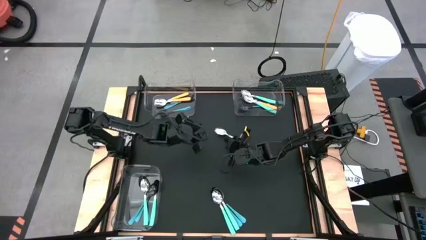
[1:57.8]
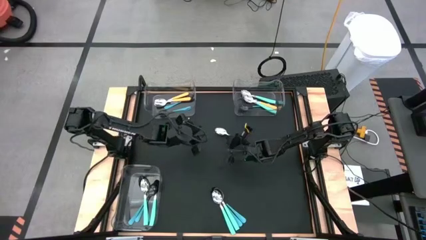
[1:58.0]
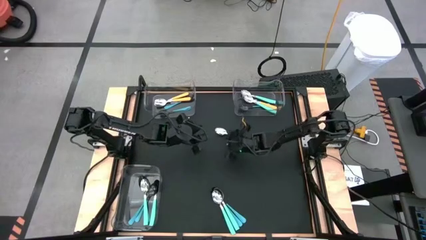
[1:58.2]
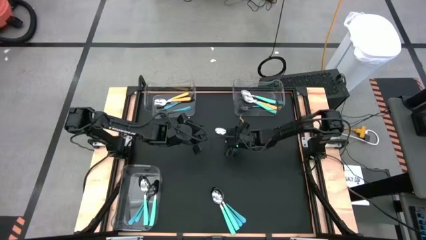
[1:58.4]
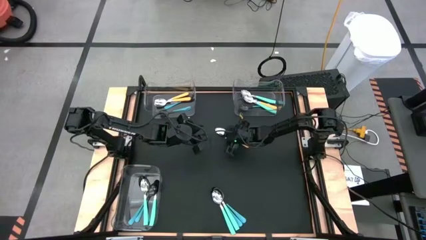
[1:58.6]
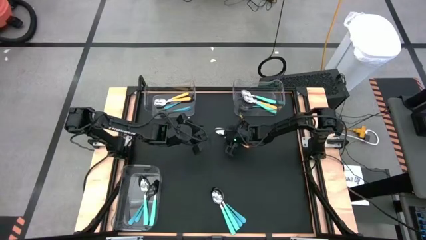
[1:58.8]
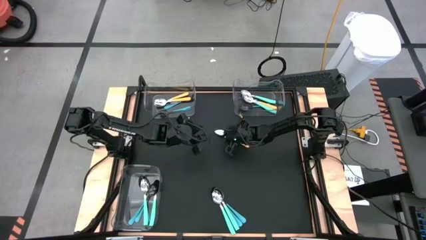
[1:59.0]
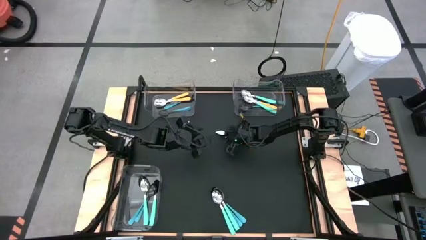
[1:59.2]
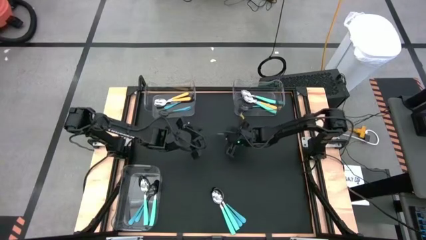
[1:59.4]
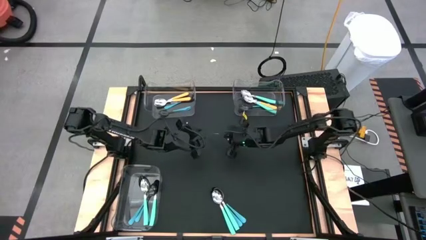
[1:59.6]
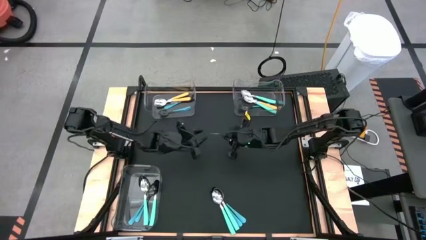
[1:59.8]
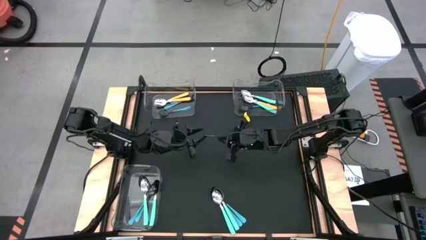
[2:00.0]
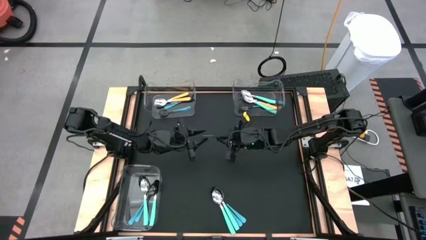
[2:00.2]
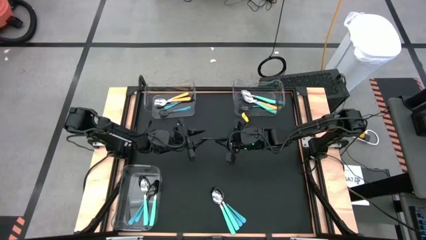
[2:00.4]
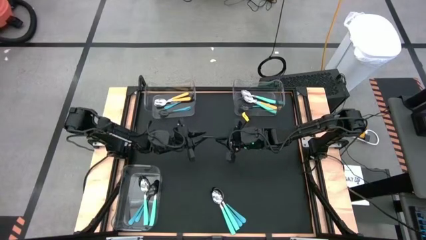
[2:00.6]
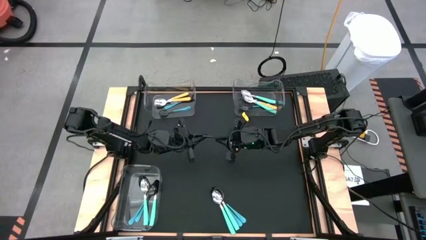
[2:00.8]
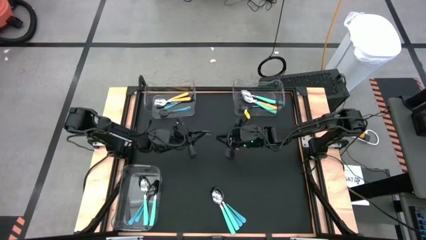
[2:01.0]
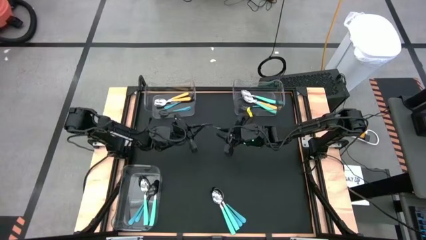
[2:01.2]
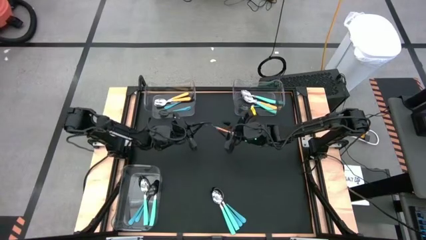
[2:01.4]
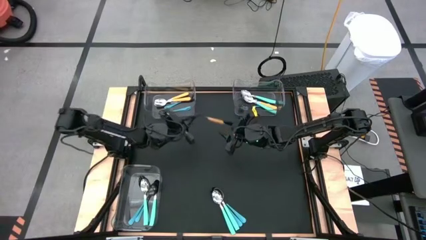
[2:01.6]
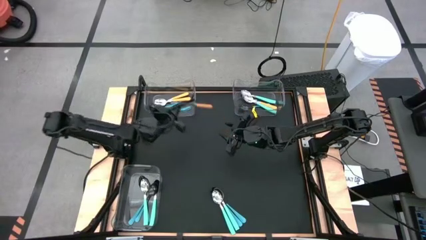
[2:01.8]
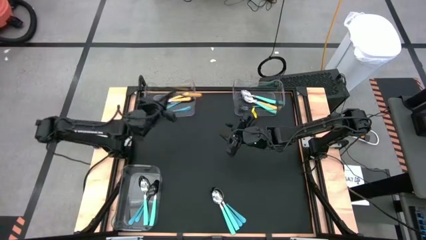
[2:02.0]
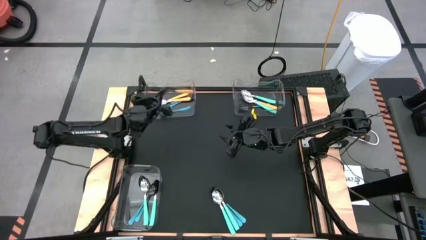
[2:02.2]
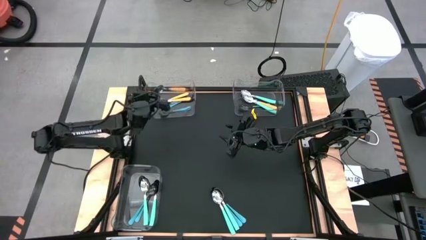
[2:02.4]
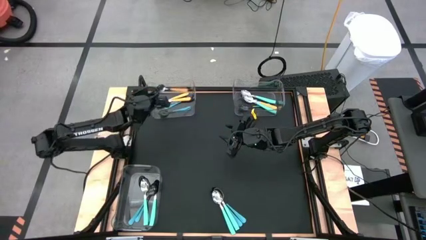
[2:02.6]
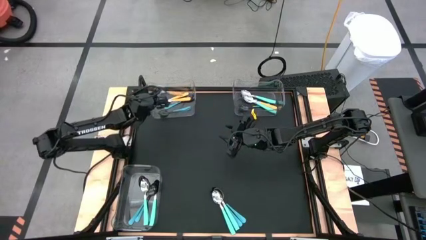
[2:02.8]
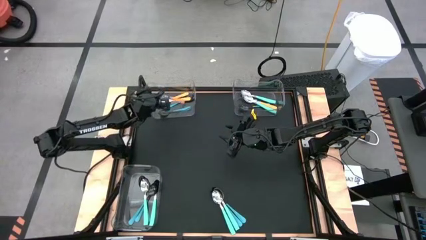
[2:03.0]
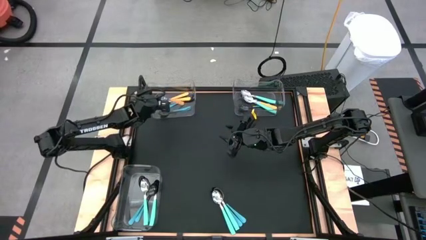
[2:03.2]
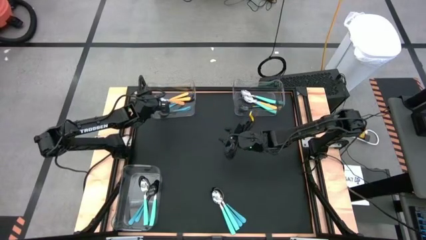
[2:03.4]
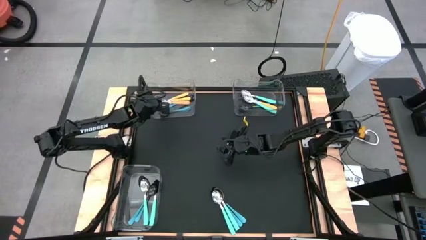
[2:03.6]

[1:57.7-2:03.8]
Task: Sort silverware by color (type)
Put the yellow spoon into the top left transparent bin

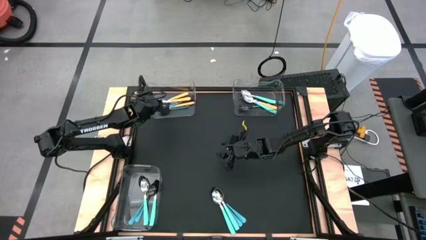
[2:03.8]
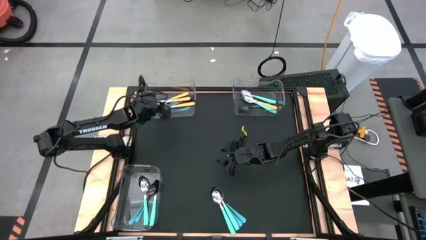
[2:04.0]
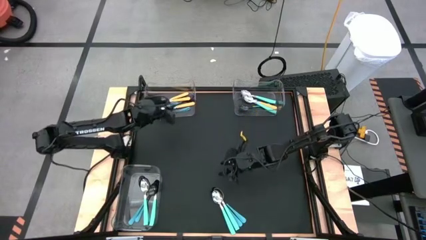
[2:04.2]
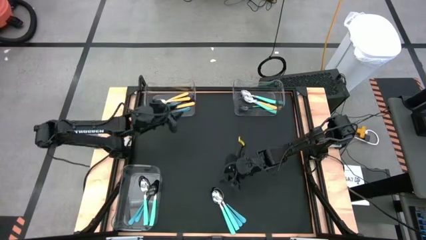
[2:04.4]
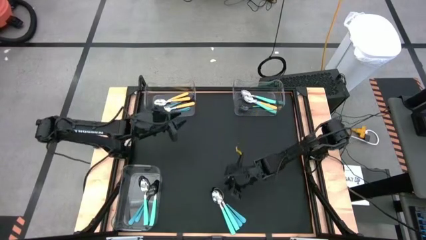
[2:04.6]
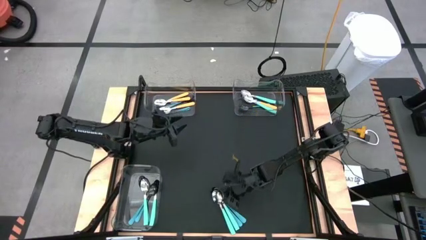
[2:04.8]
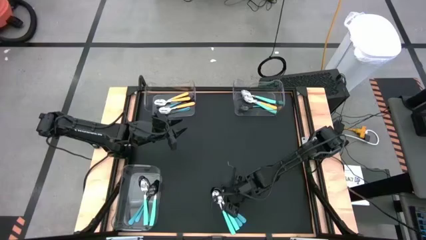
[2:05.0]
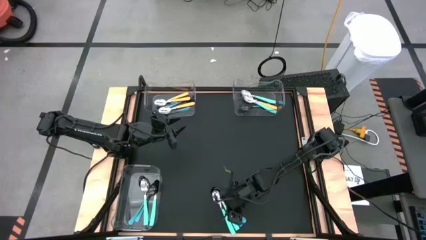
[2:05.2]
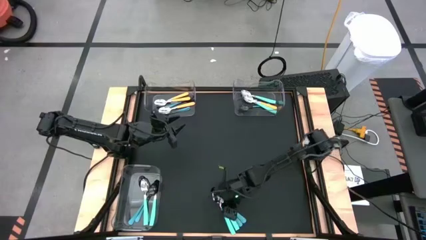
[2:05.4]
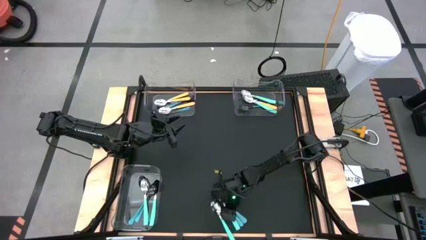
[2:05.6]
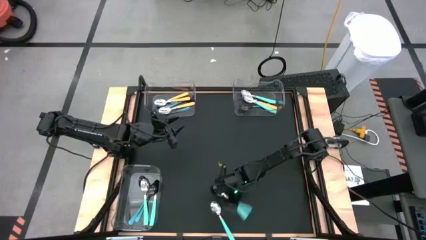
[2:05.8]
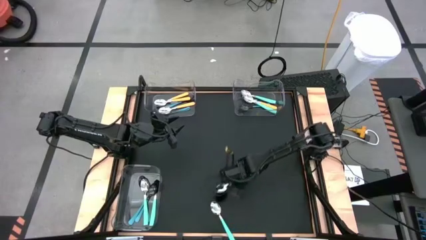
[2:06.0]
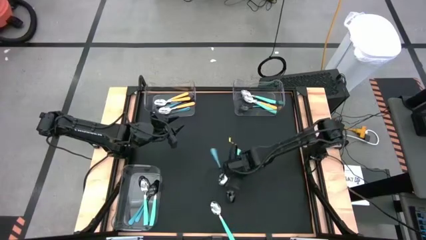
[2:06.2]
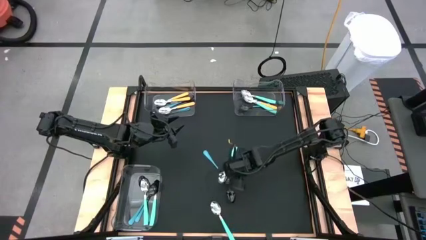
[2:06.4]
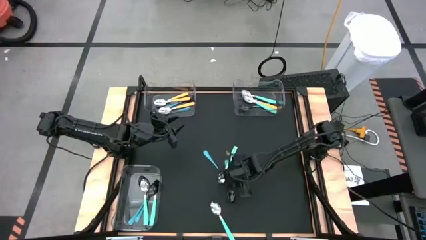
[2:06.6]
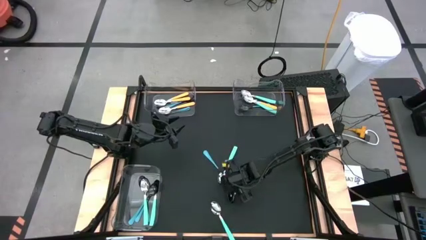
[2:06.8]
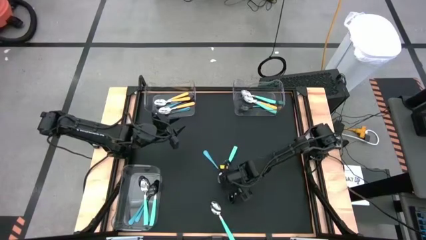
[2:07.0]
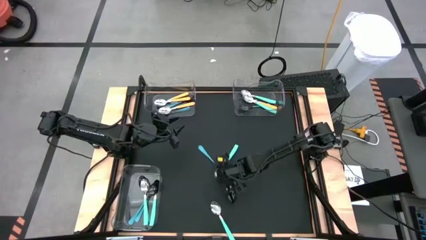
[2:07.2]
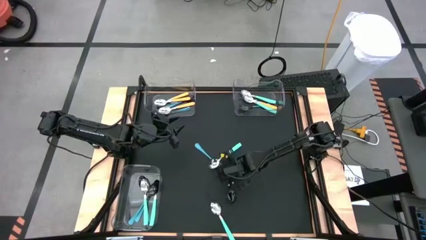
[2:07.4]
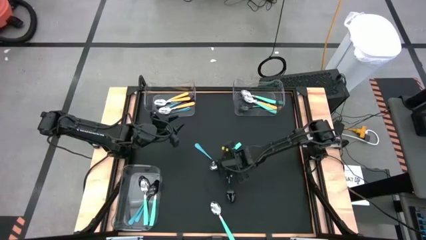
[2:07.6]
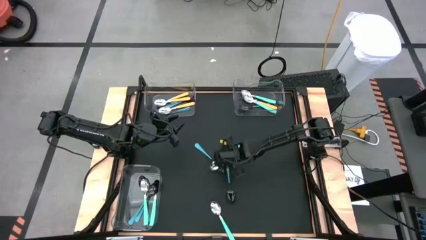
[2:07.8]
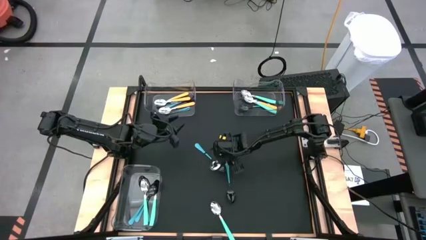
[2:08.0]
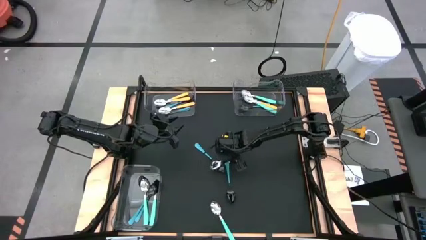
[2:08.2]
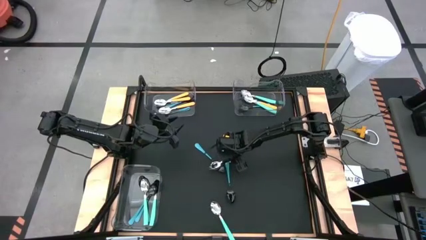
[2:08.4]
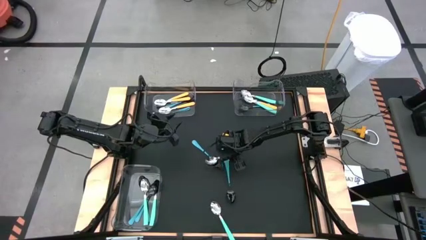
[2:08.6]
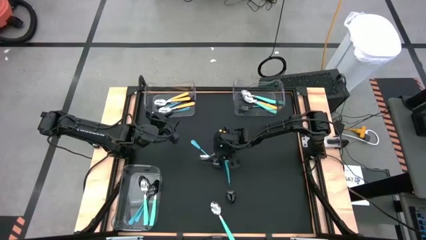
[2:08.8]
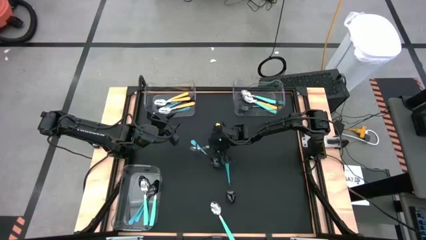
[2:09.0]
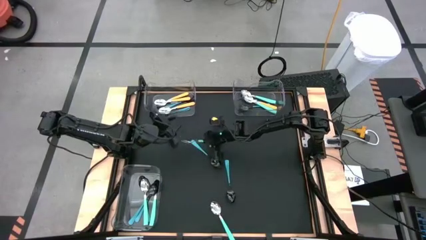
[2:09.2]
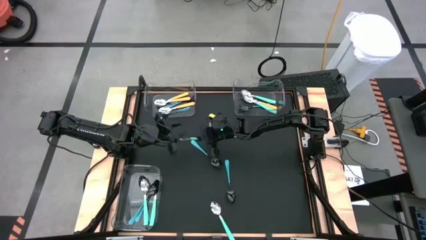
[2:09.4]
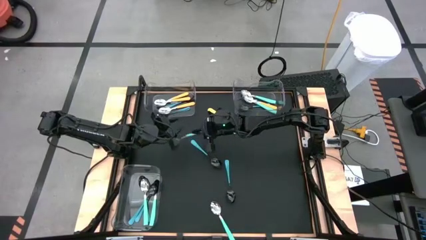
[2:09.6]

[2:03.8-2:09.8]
Put the green spoon into the top left transparent bin

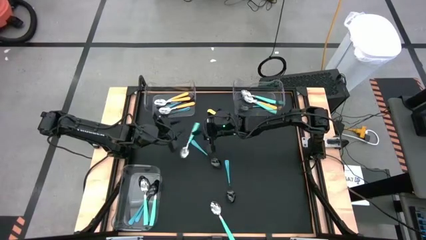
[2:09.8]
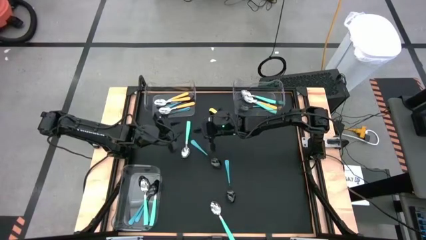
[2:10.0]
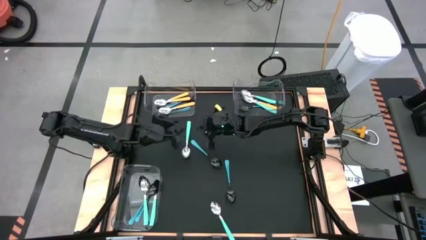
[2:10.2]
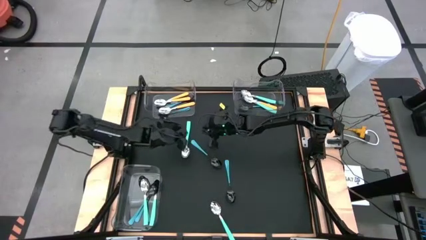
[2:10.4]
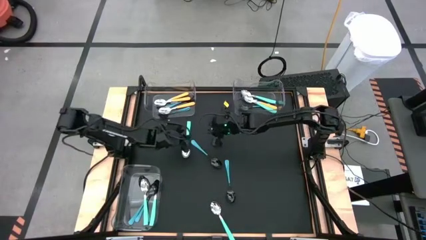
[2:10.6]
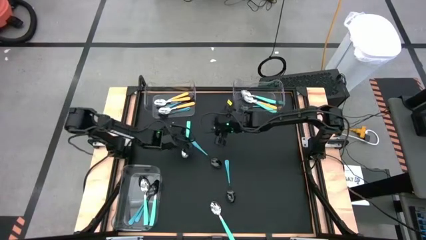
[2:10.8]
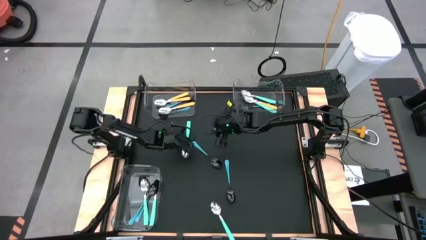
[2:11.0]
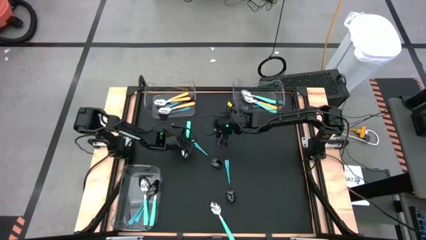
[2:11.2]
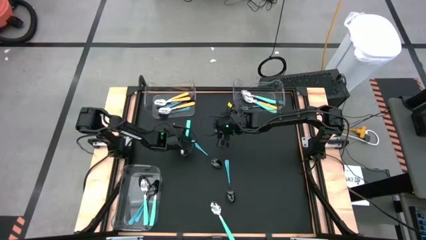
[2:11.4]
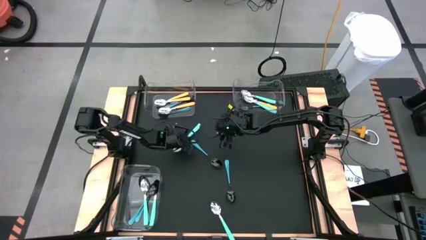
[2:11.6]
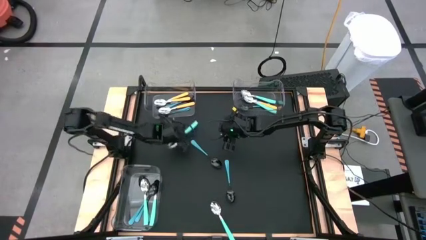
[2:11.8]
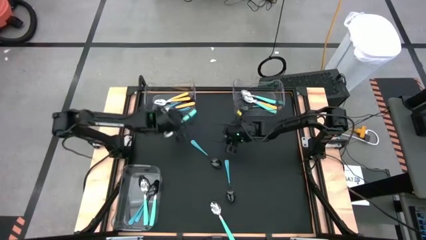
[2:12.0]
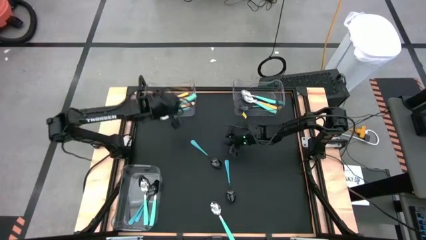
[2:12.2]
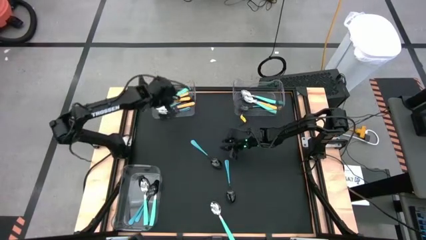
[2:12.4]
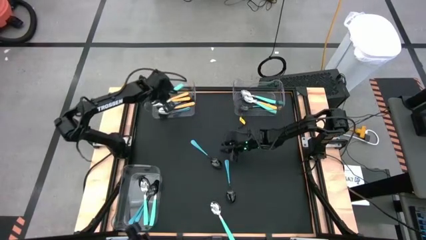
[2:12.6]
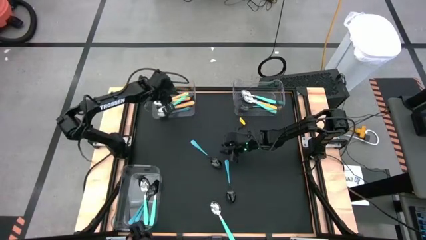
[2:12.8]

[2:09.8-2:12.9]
Put the green spoon into the top left transparent bin
